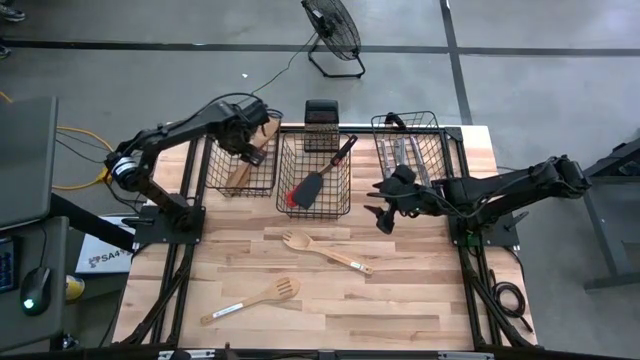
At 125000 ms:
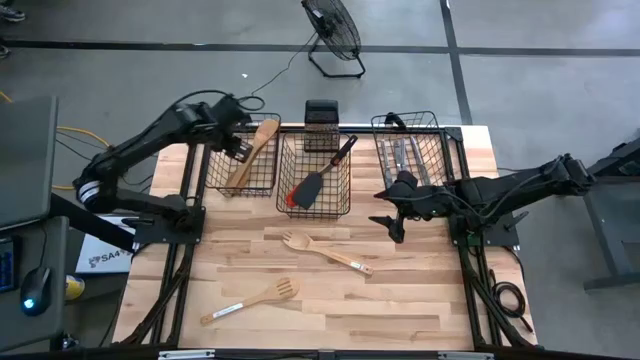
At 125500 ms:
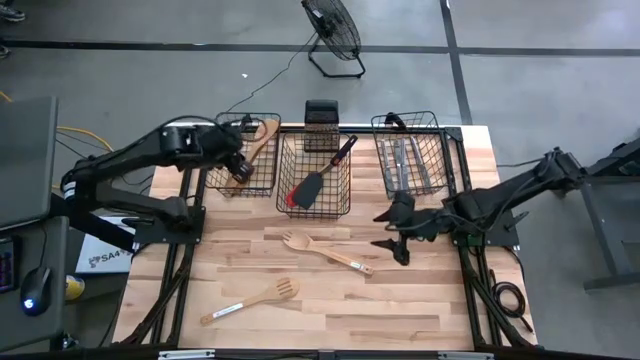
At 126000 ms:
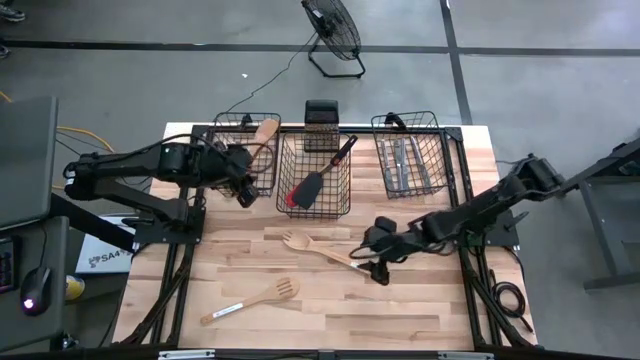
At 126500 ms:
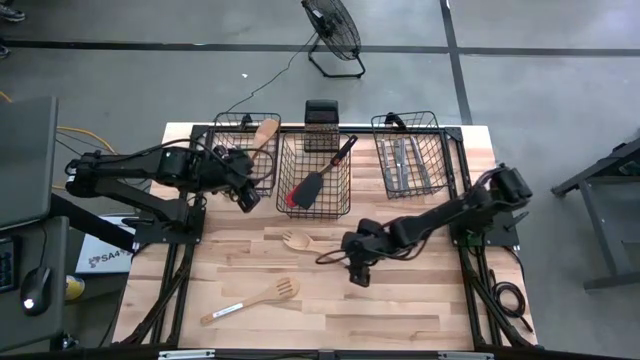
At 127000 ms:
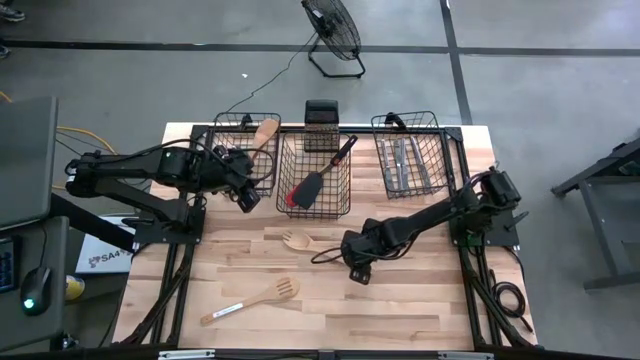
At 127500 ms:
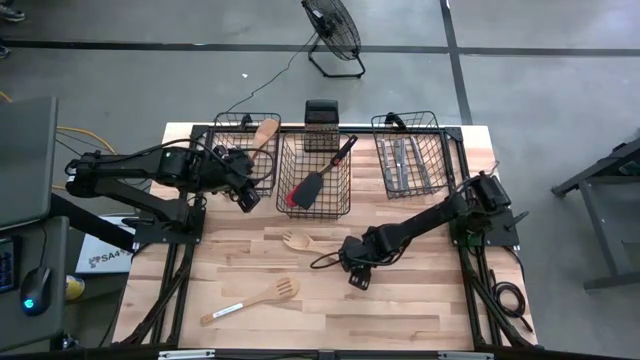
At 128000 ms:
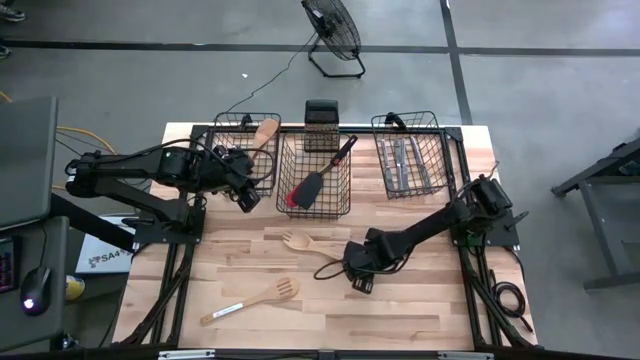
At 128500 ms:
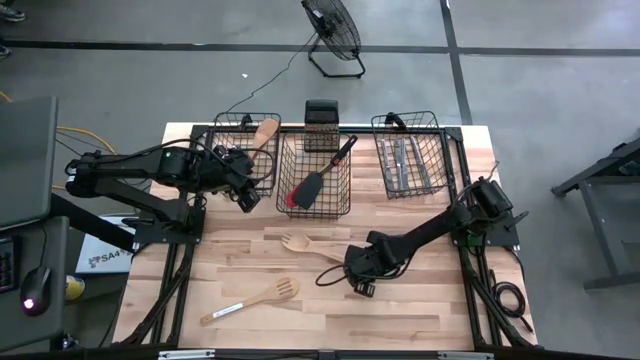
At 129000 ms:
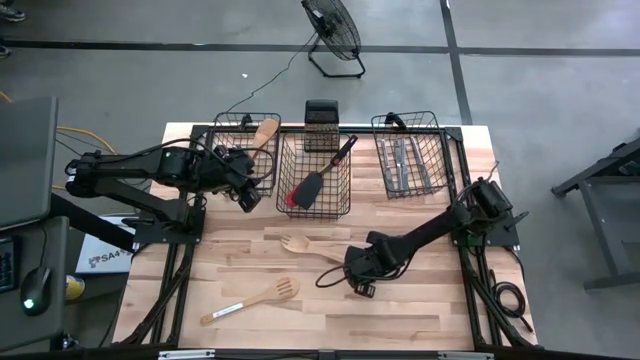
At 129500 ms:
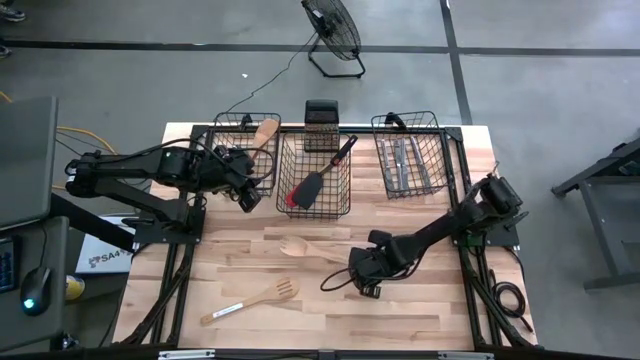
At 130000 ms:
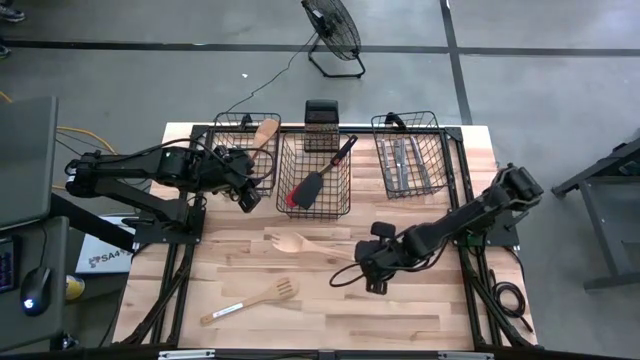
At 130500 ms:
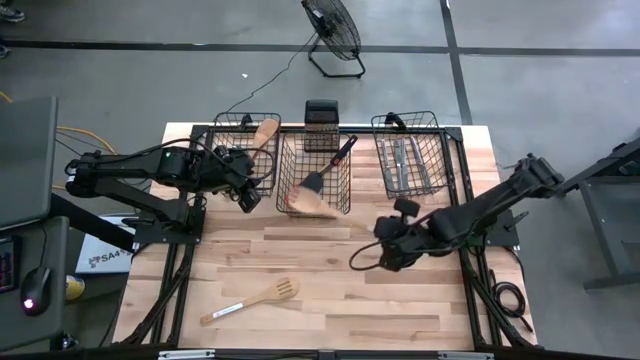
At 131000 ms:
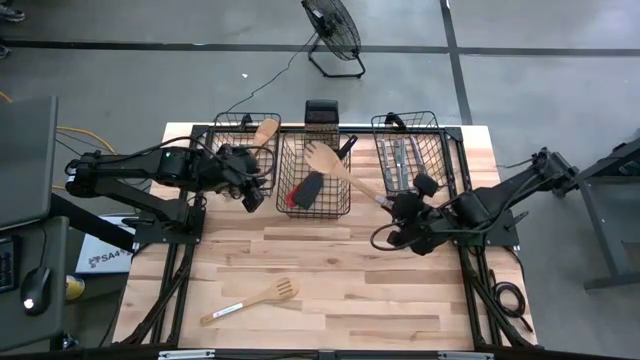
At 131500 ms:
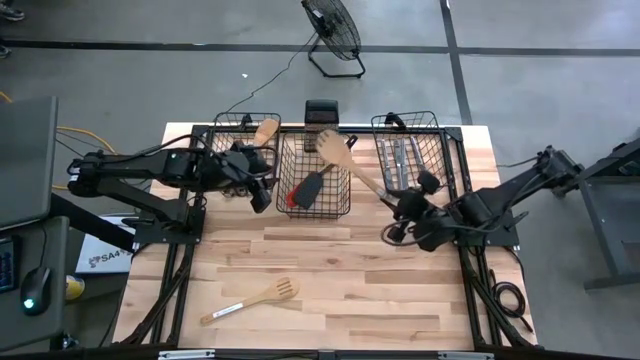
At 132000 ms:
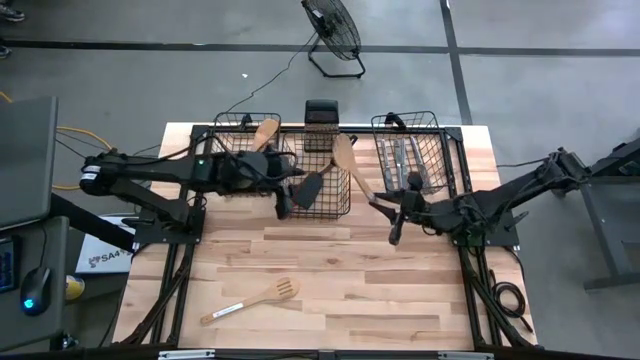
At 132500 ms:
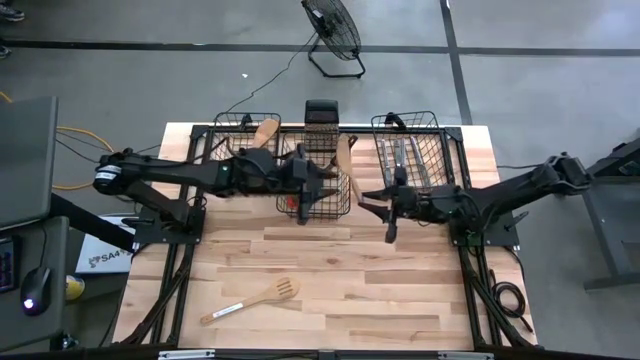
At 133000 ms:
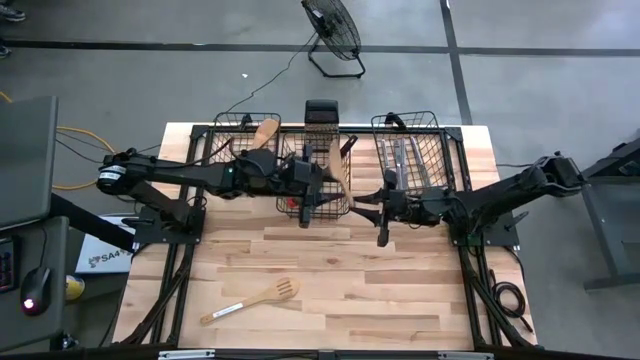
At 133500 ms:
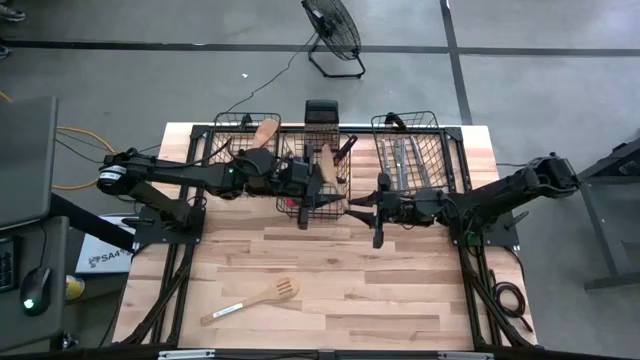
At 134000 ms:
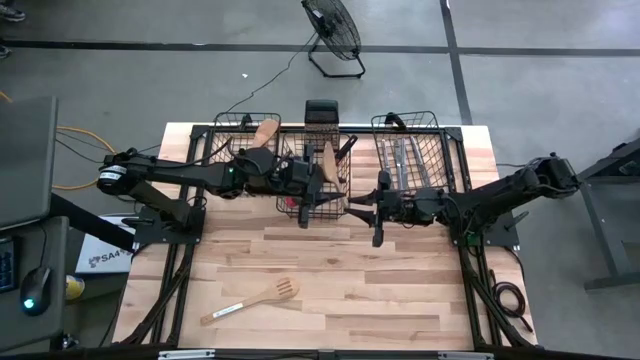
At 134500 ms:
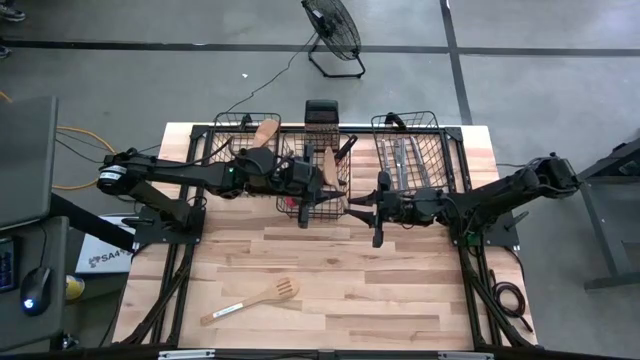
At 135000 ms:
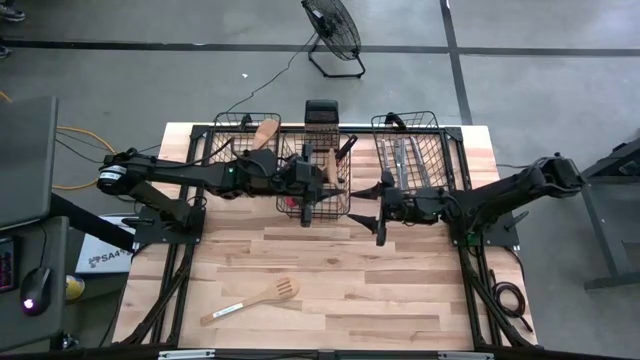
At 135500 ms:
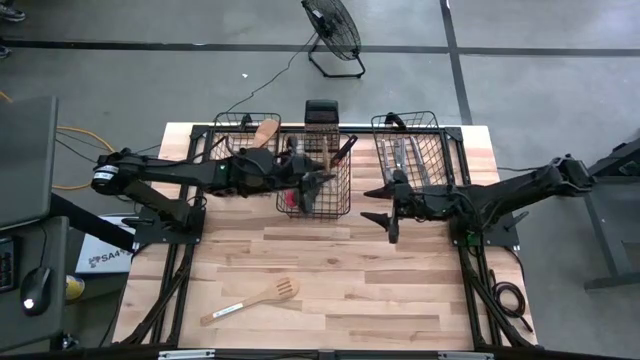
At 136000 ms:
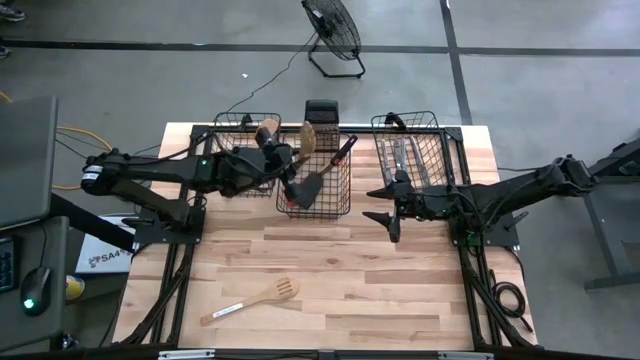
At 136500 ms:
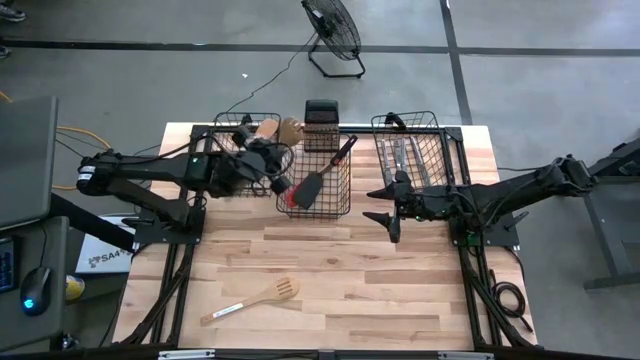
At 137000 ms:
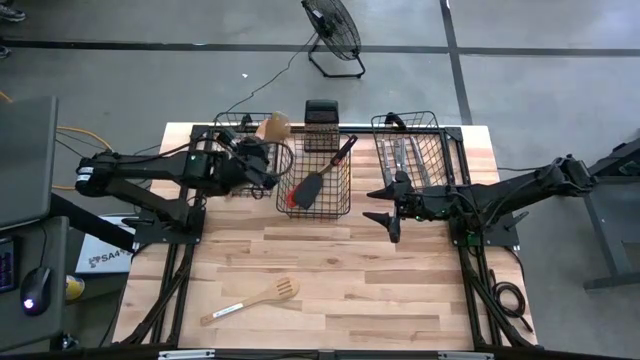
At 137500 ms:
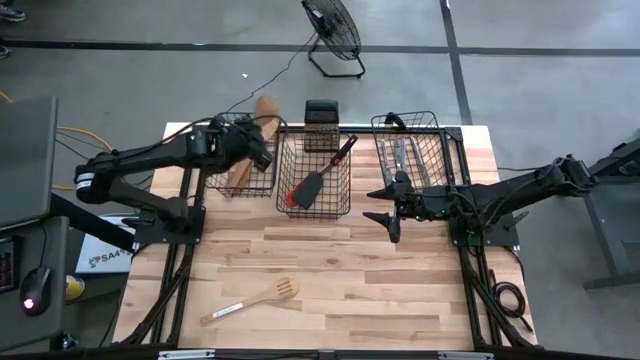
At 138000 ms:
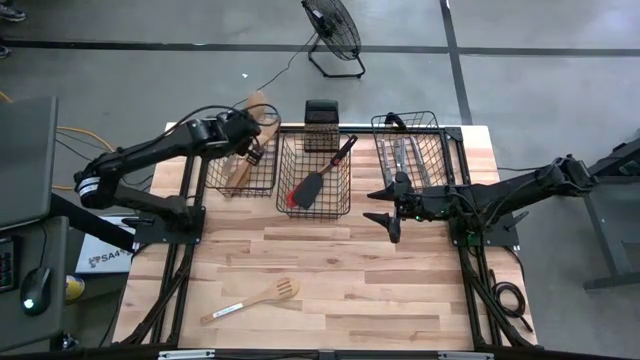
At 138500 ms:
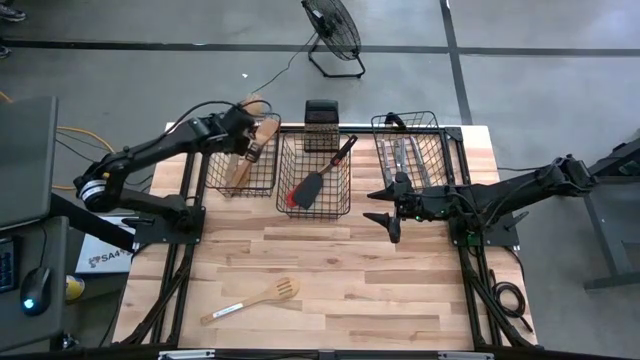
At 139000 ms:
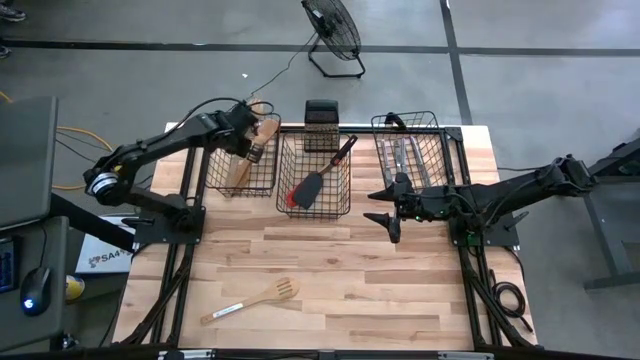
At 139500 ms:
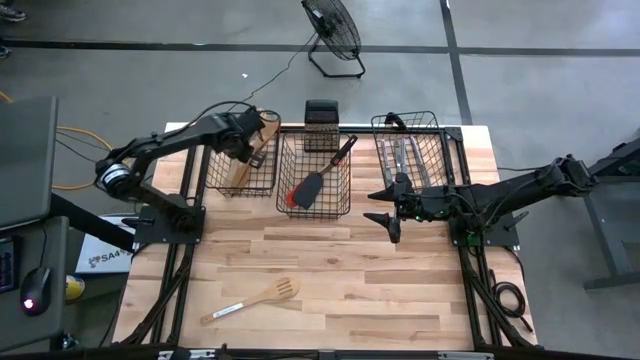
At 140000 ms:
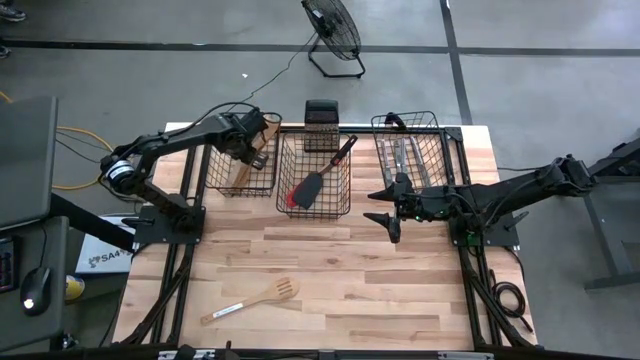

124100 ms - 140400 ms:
Task: Pick & Place Kitchen Items
Put the light brown wooden serving fork into the left wire basket

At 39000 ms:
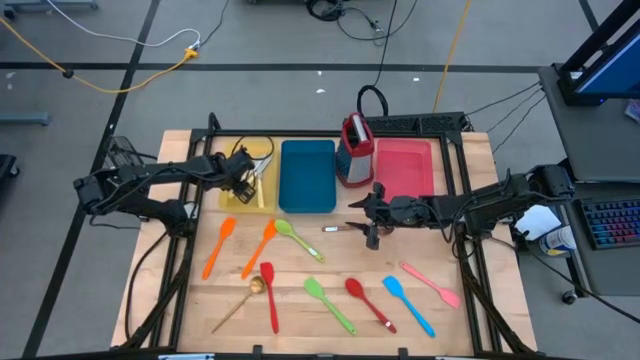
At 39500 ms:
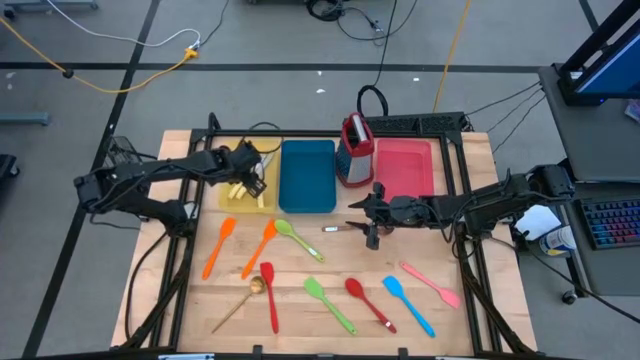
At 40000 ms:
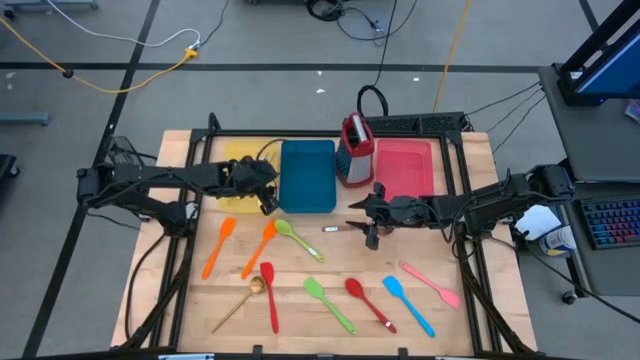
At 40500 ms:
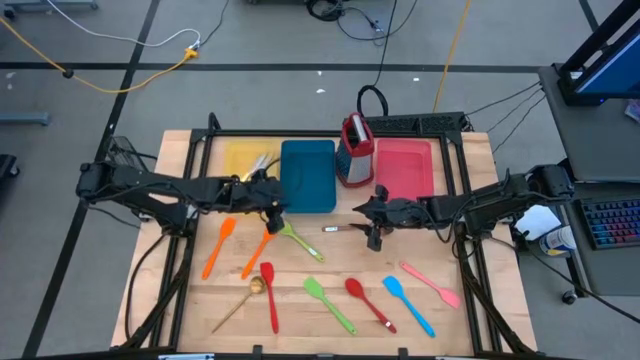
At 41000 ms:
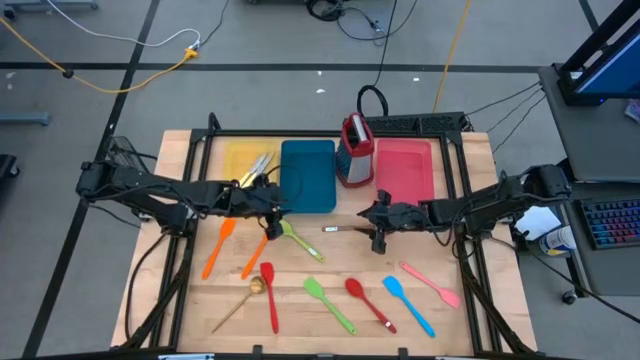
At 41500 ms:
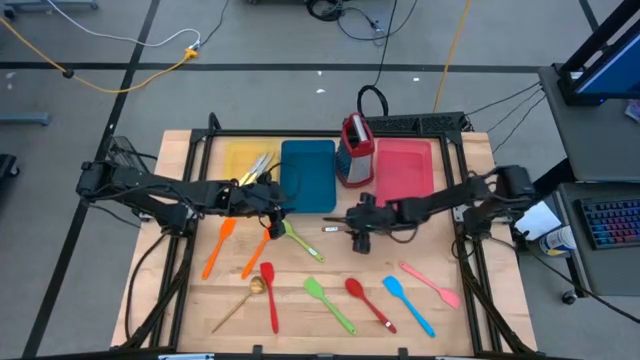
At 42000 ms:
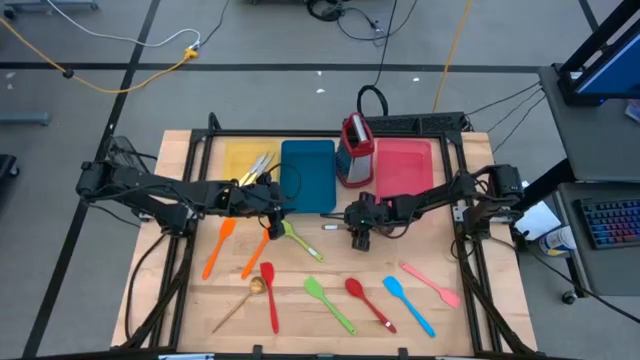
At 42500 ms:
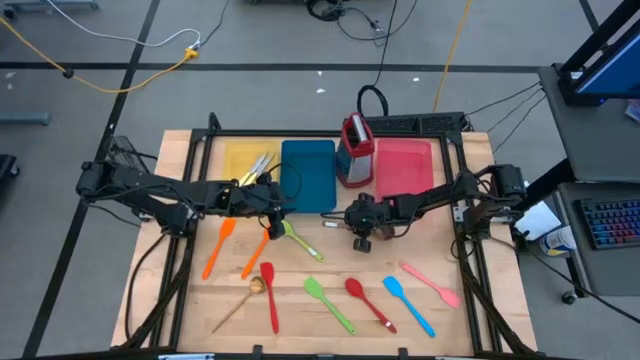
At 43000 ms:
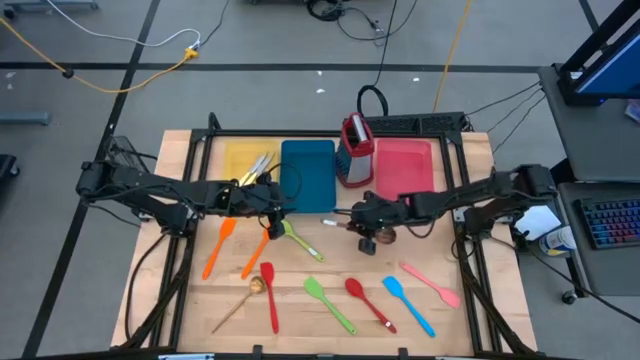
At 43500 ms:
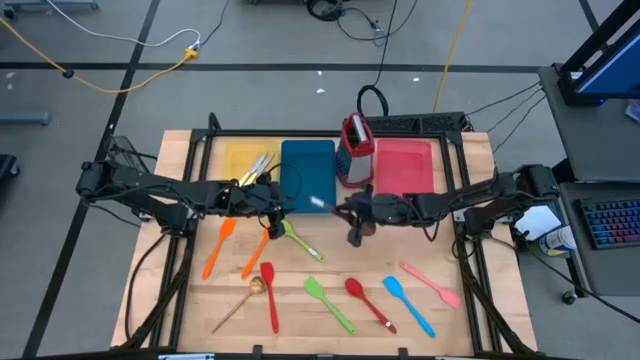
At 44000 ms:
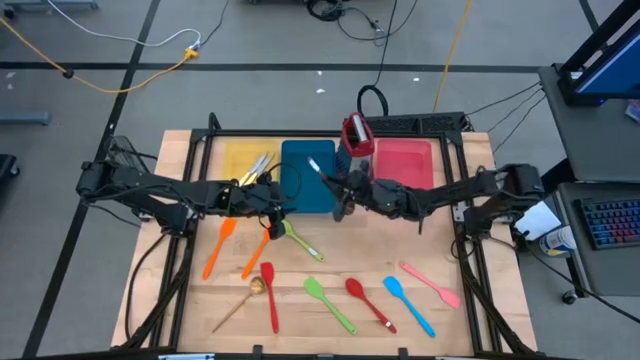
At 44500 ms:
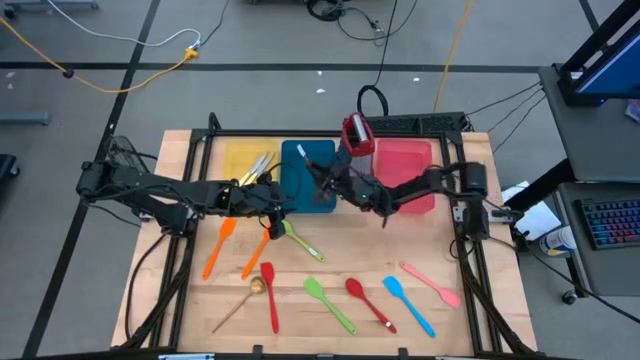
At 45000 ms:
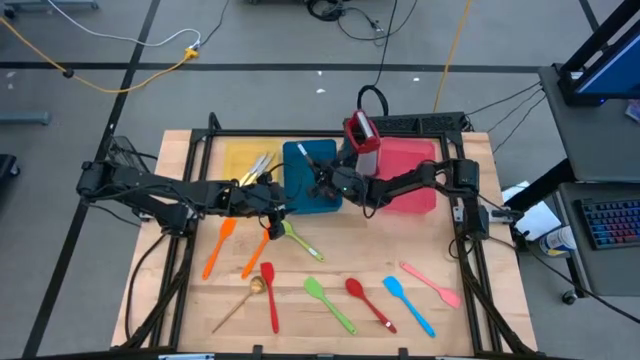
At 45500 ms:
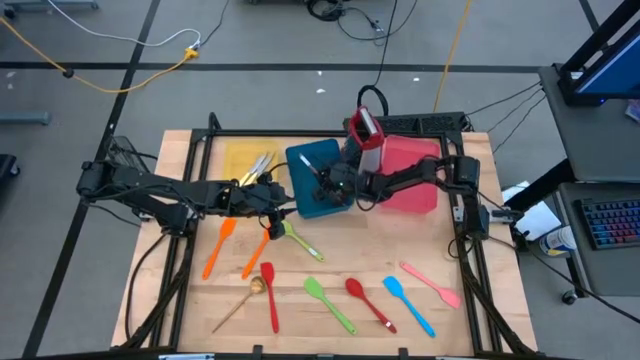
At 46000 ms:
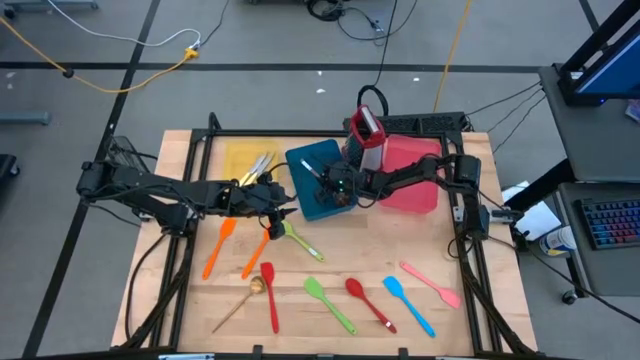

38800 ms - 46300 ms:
Task: Pick & Place Kitchen Items
Put the wooden serving spoon into the blue bin
